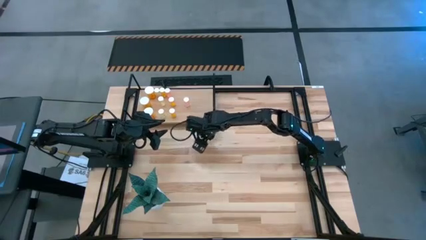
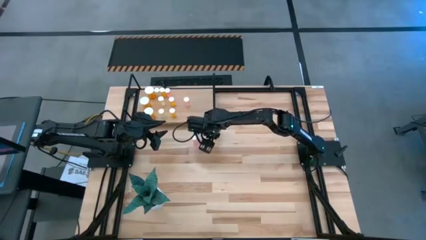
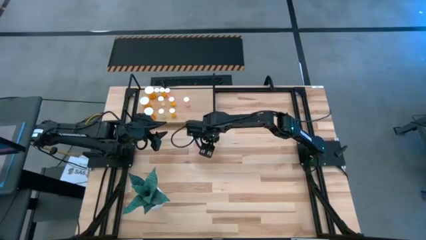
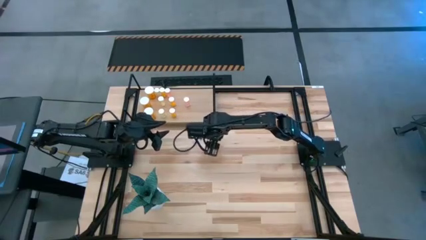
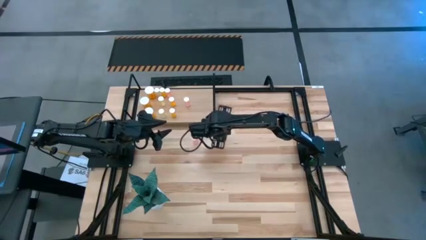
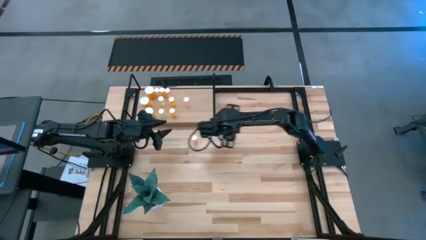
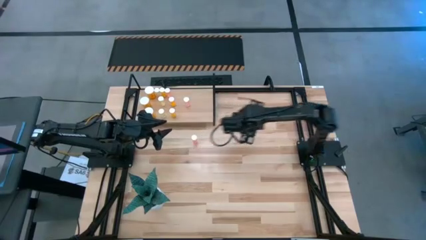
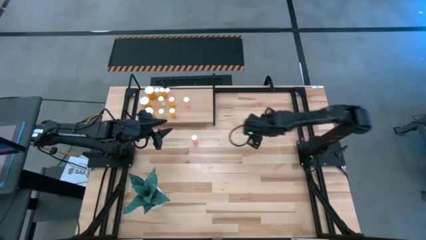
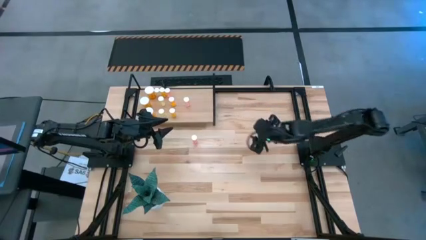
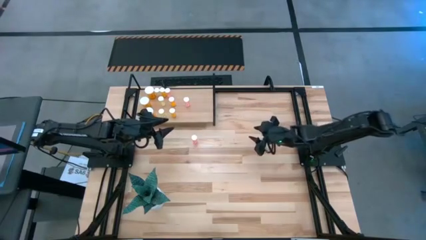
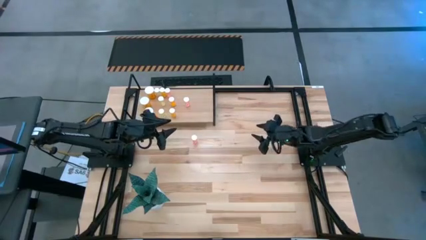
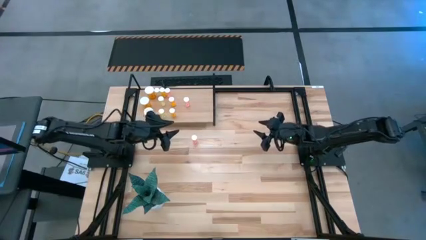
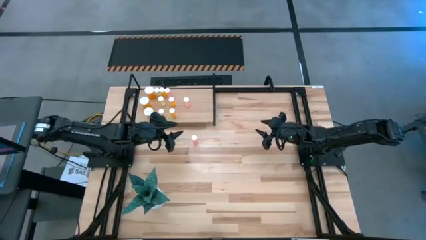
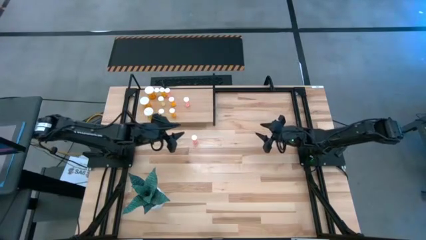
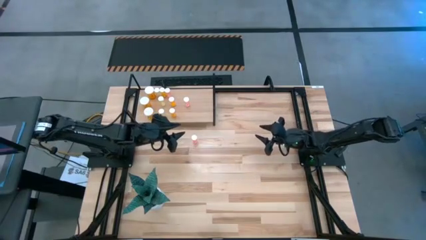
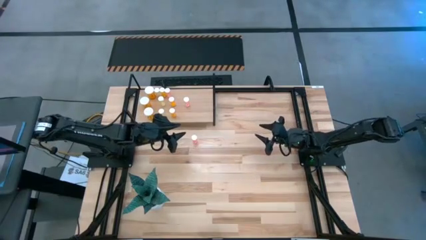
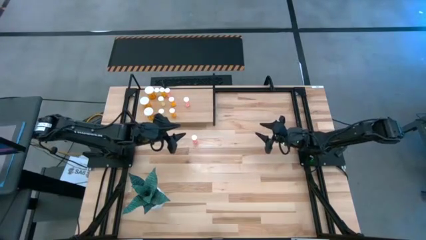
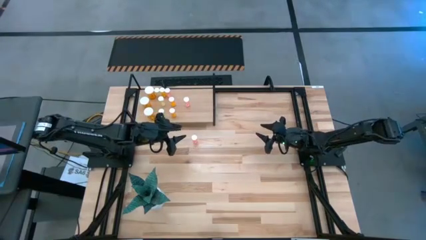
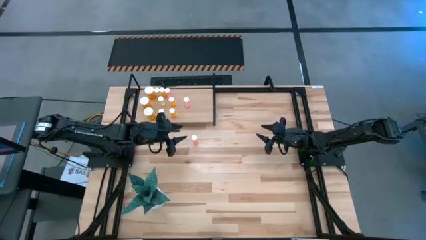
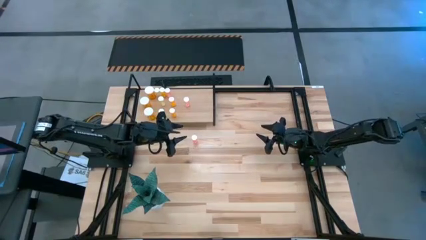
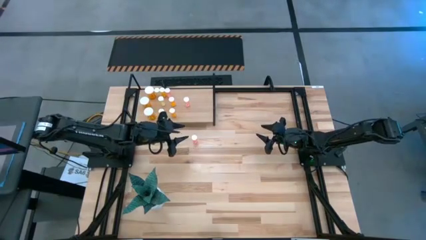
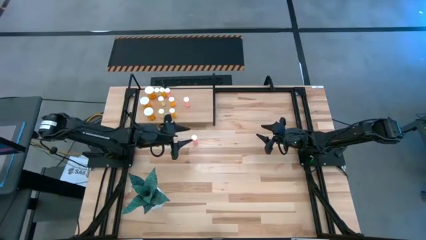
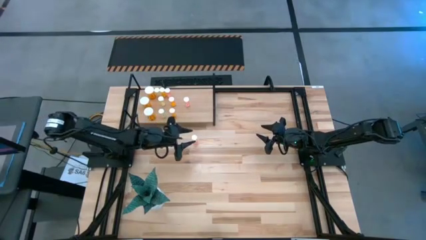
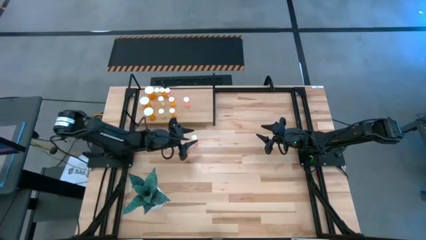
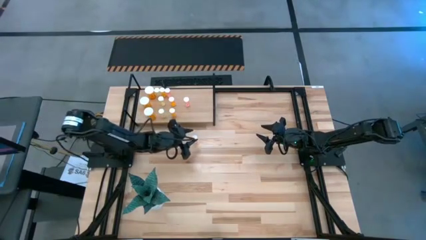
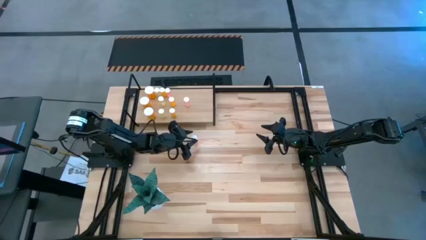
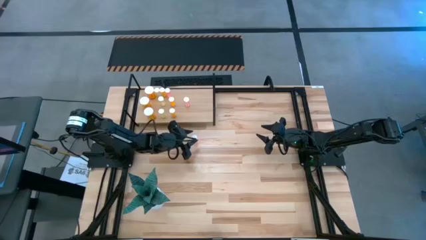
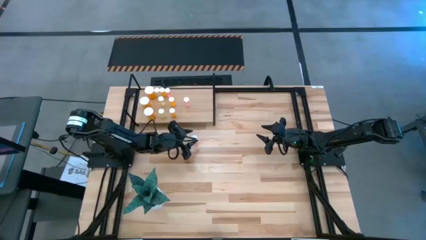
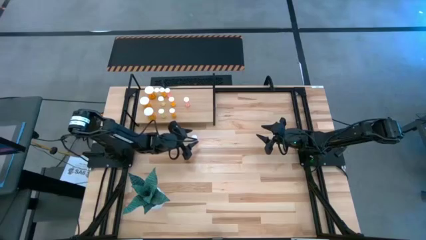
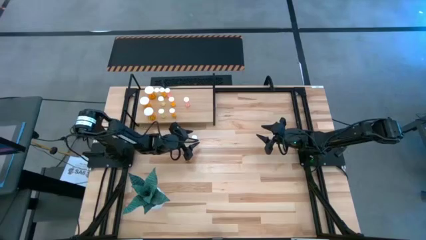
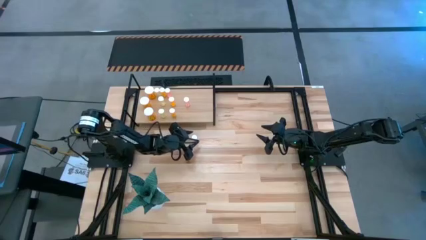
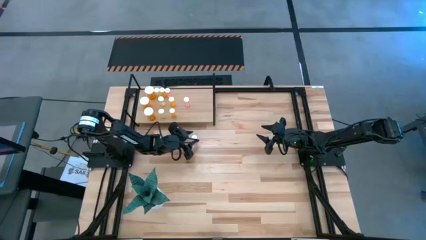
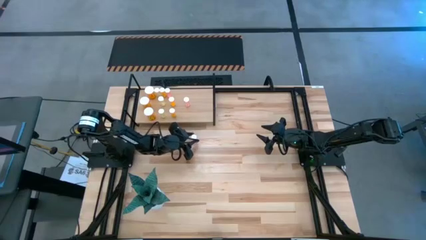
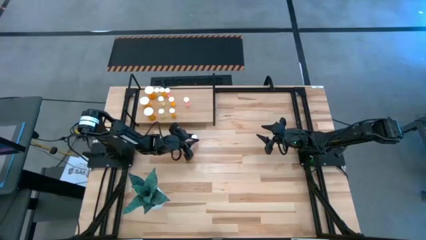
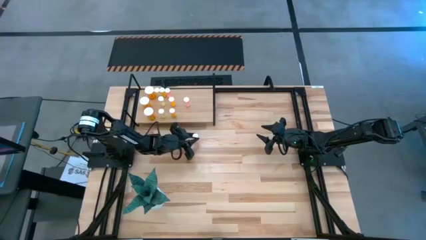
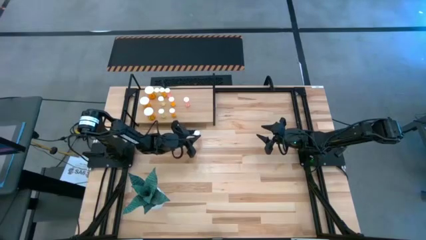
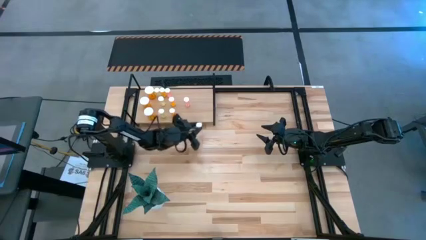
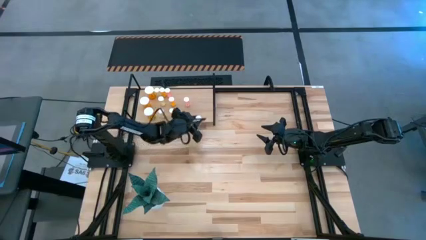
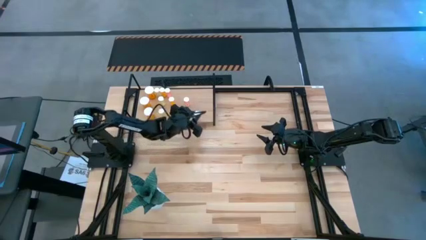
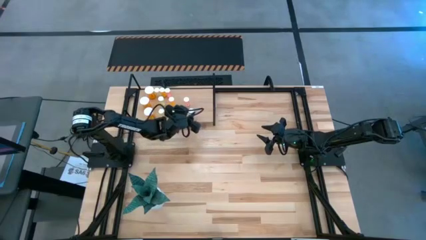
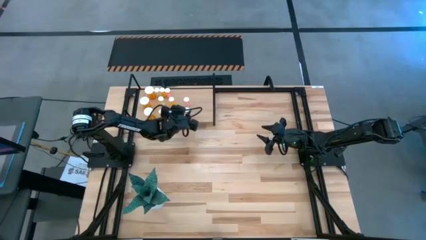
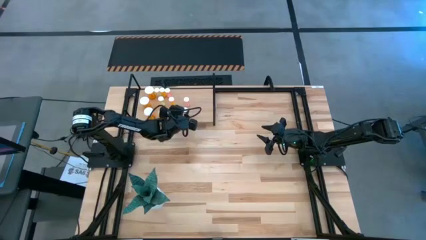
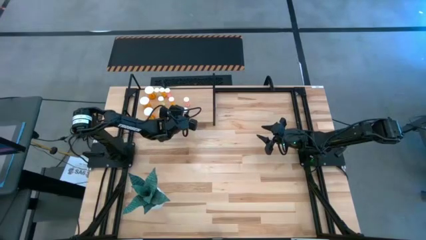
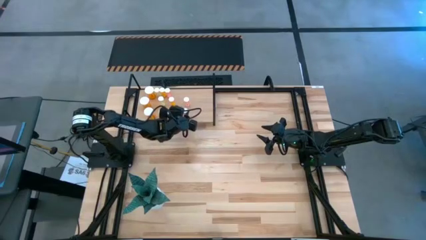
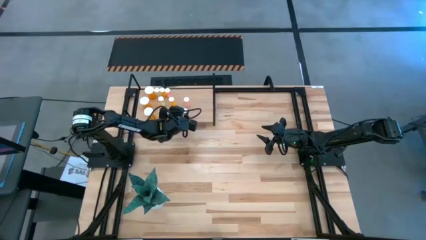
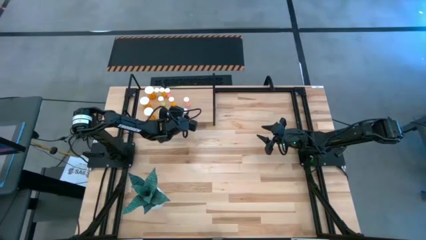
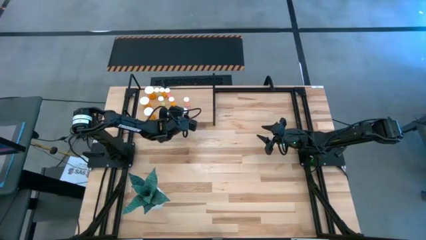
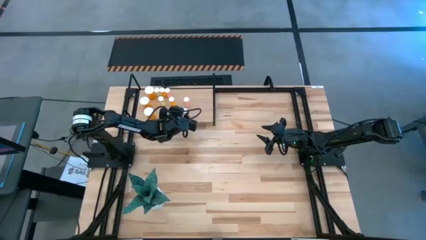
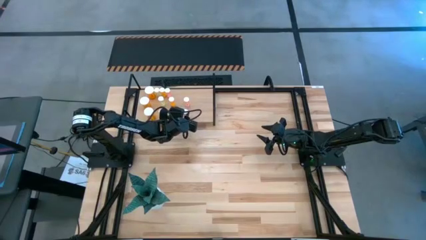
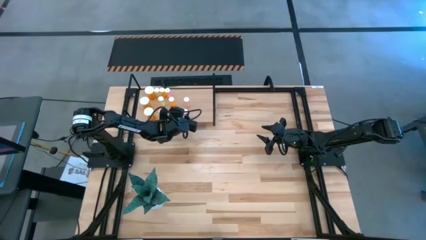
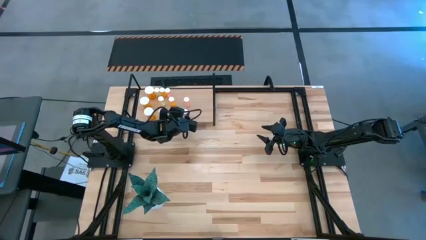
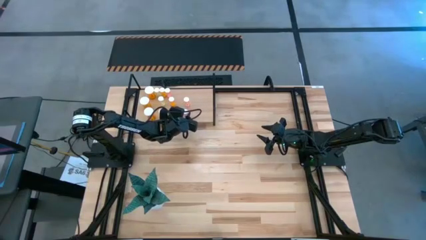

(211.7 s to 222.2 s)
Task: Pick and place medicine bottles onto shelf by color
Put the pink pill bottle aligned with the other pink pill bottle on the shelf
